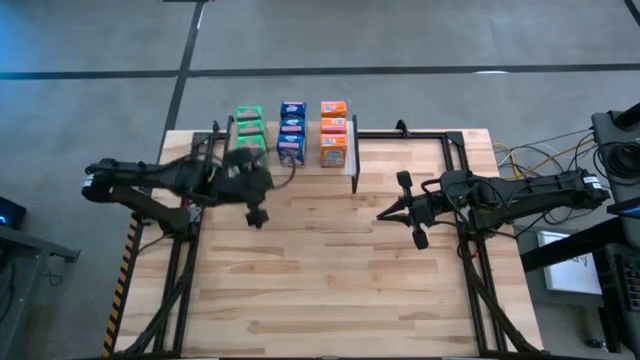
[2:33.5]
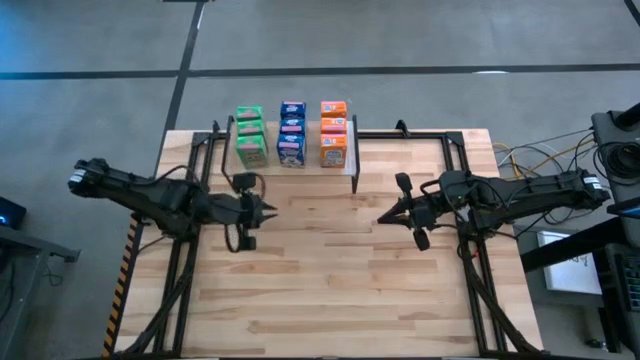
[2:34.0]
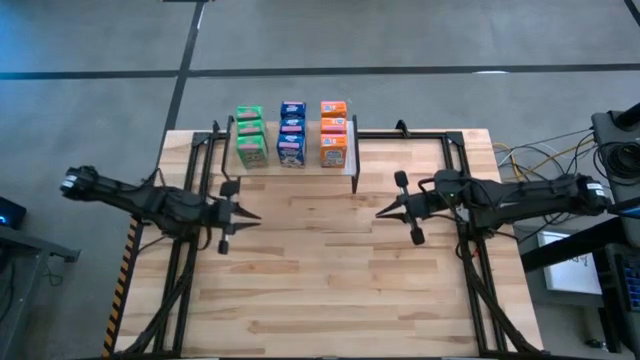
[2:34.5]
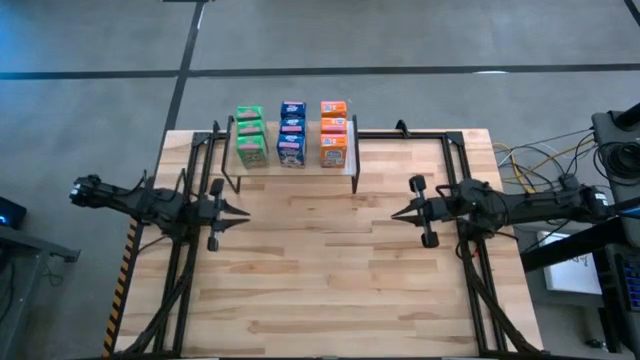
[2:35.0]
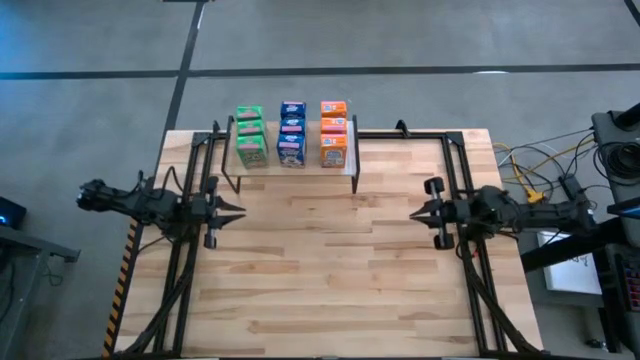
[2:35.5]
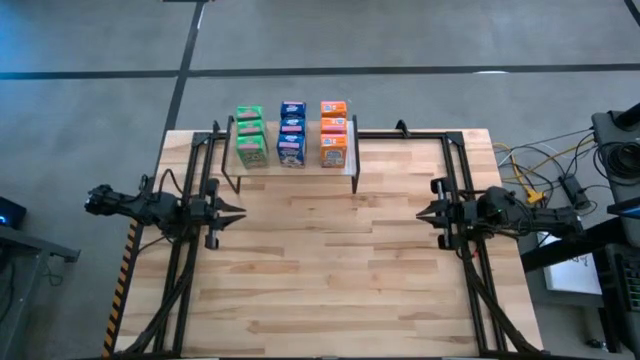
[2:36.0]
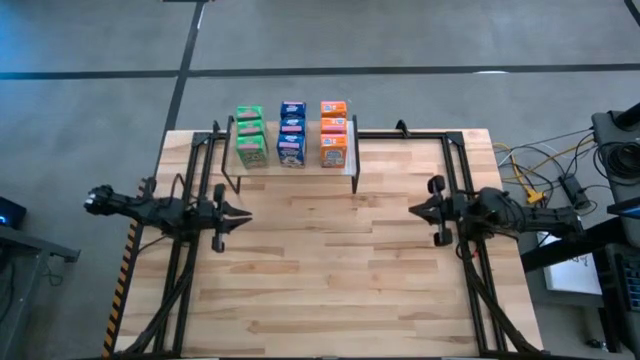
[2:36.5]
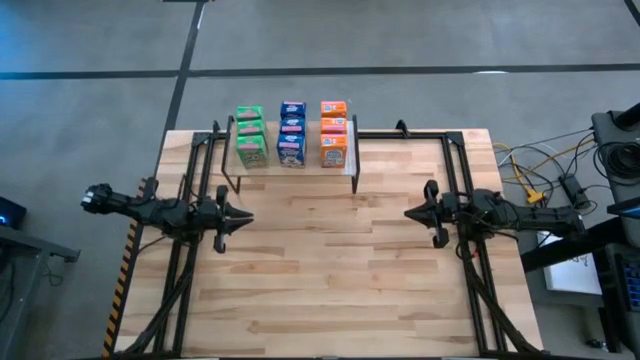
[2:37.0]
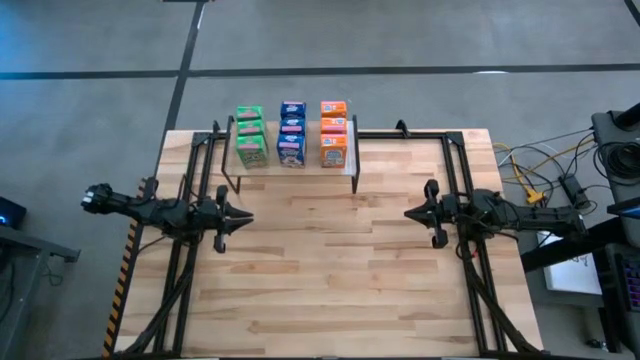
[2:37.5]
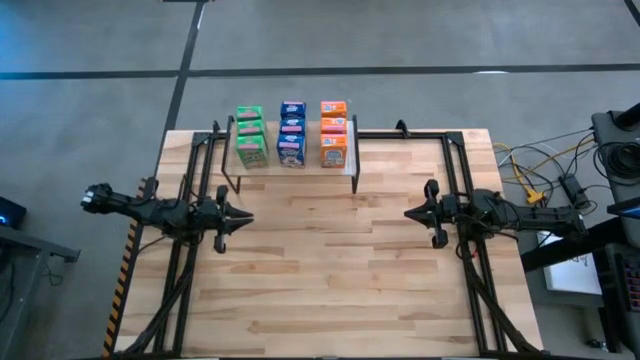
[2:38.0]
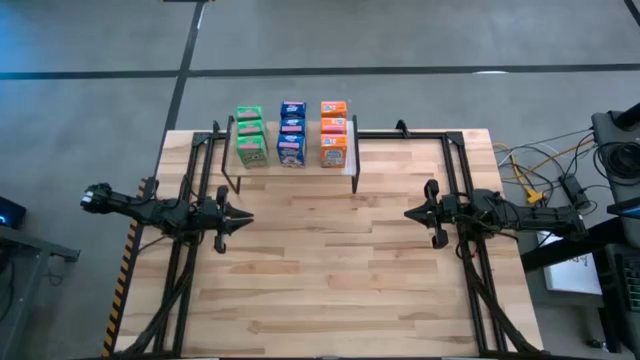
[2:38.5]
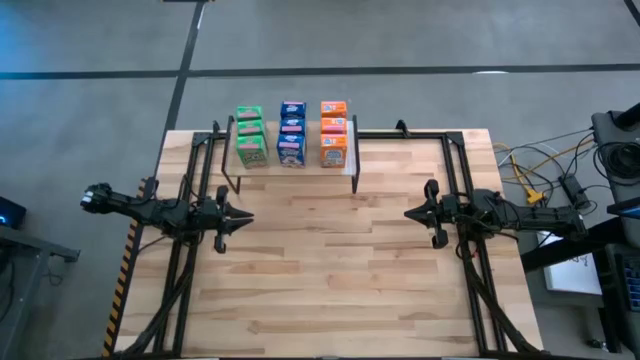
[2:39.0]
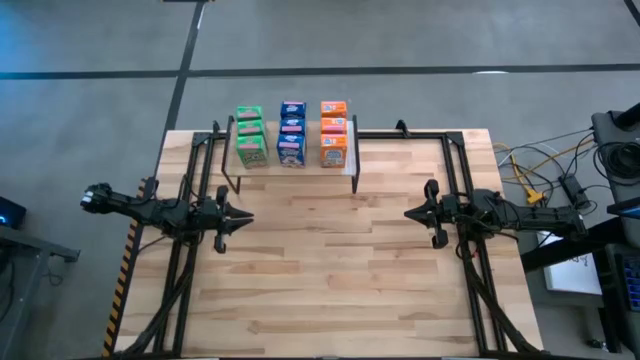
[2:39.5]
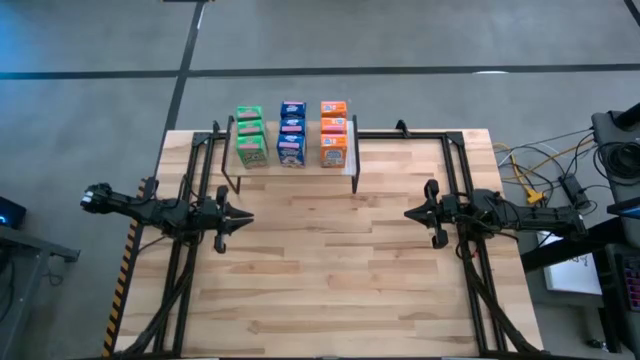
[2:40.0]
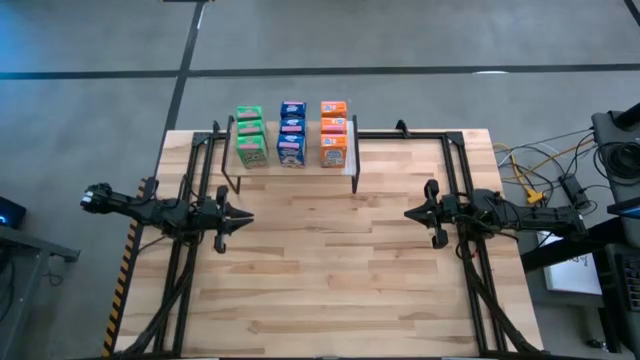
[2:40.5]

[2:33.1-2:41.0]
Task: Stack cereal on shelf
Return to Home Position

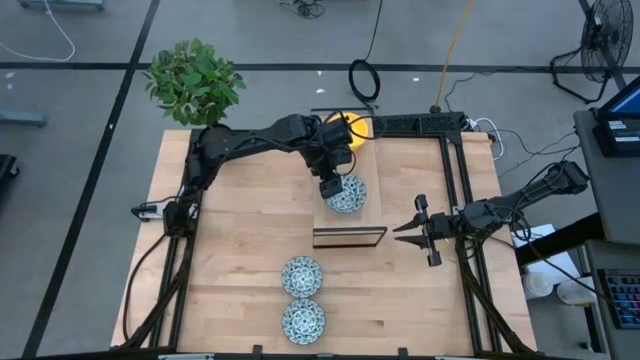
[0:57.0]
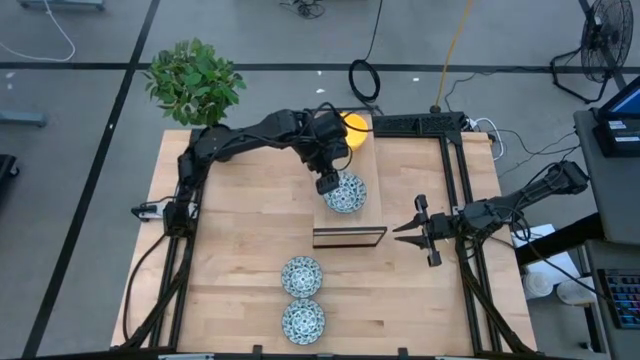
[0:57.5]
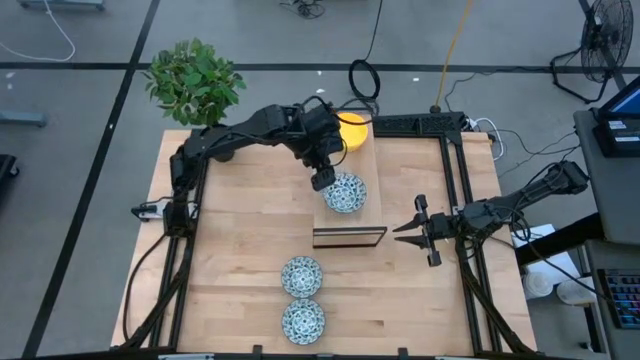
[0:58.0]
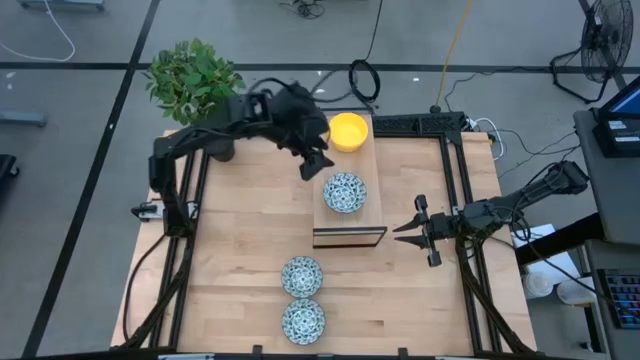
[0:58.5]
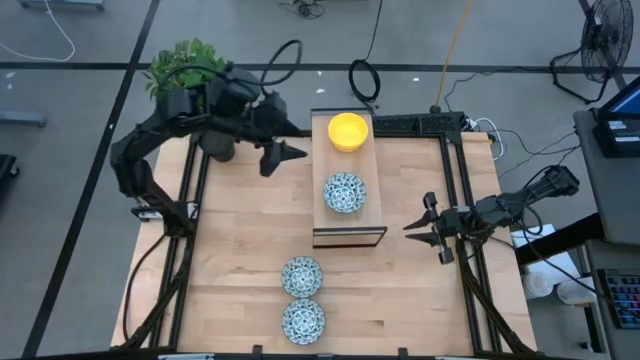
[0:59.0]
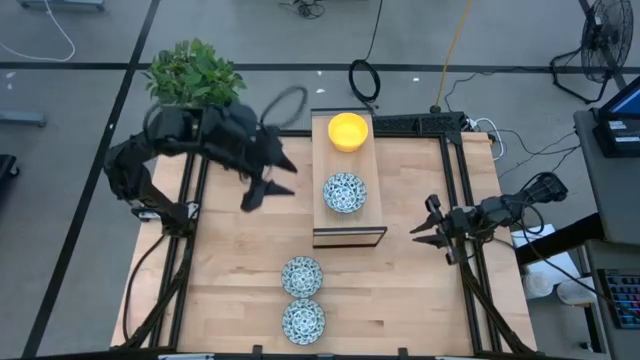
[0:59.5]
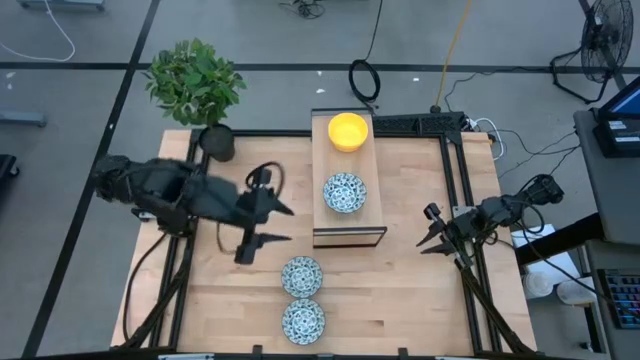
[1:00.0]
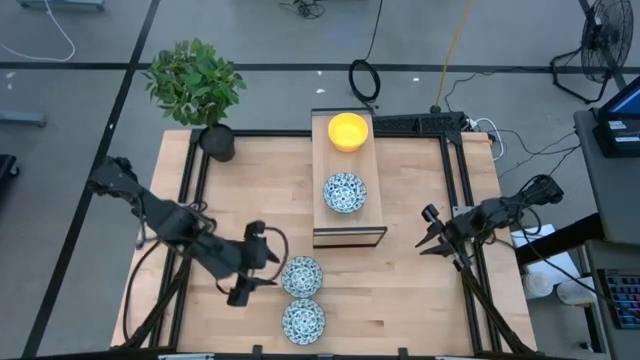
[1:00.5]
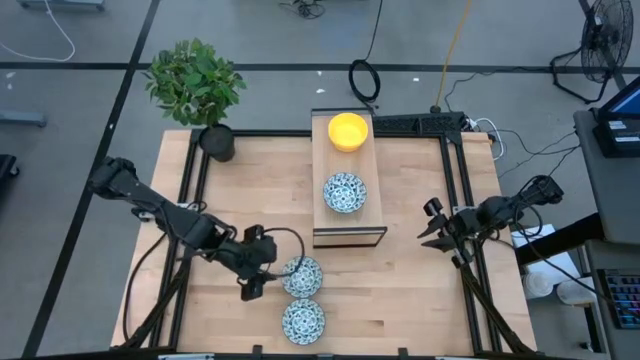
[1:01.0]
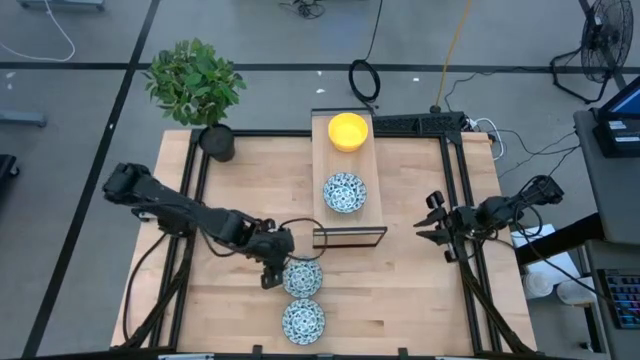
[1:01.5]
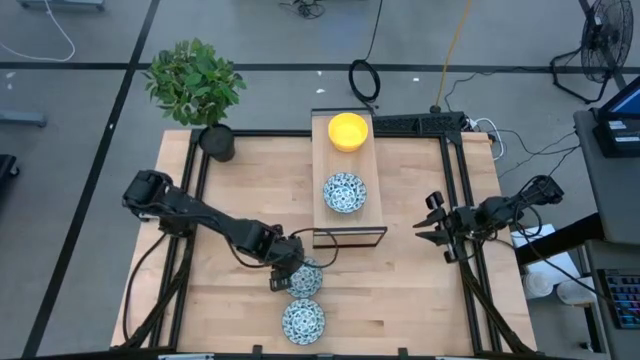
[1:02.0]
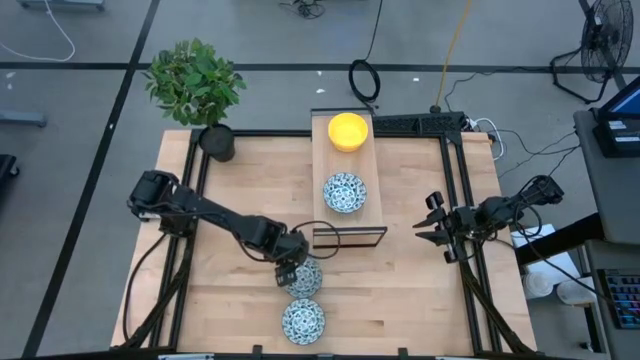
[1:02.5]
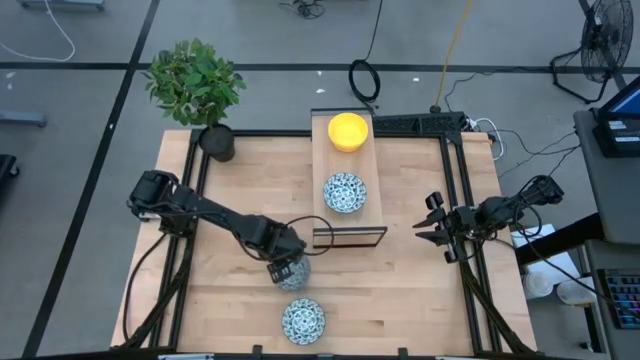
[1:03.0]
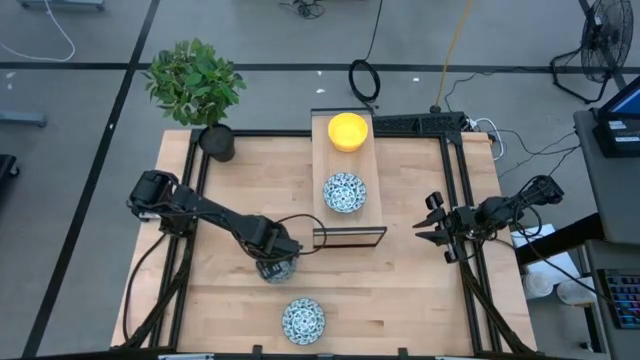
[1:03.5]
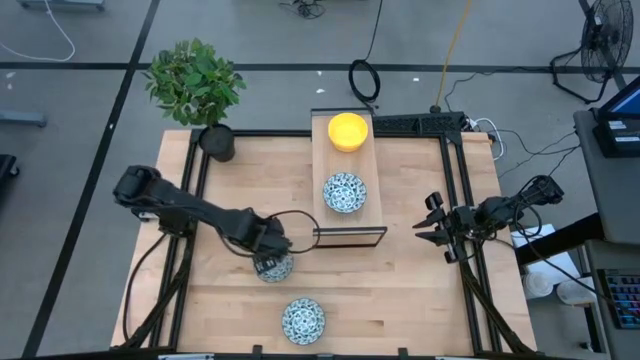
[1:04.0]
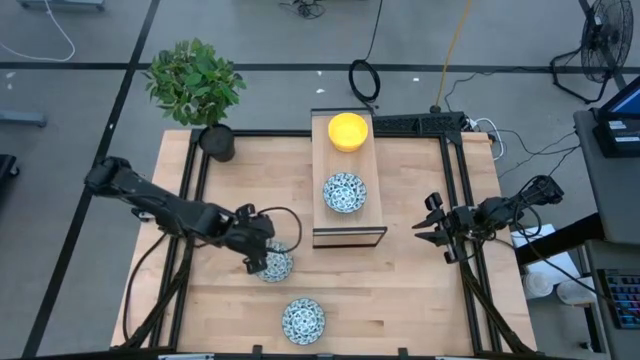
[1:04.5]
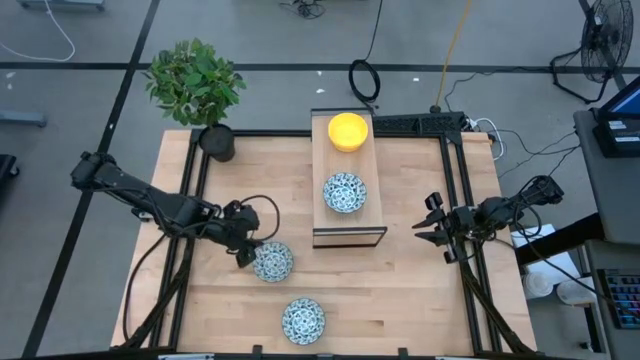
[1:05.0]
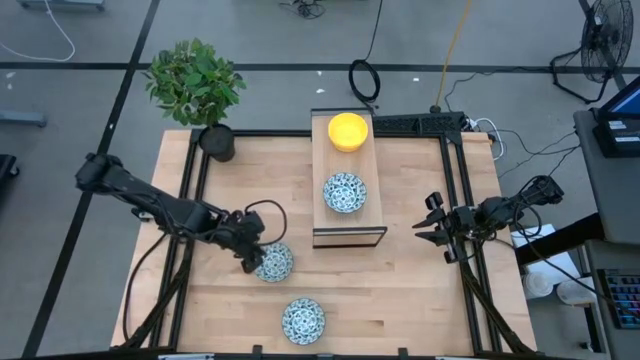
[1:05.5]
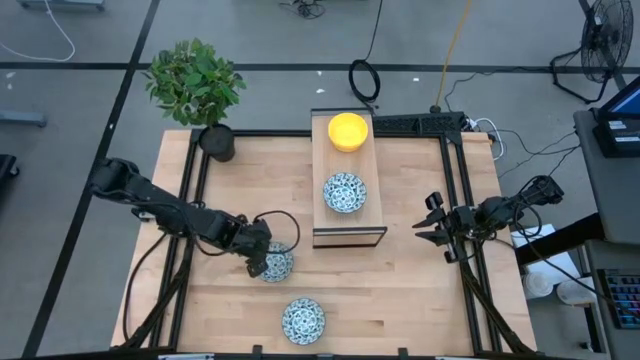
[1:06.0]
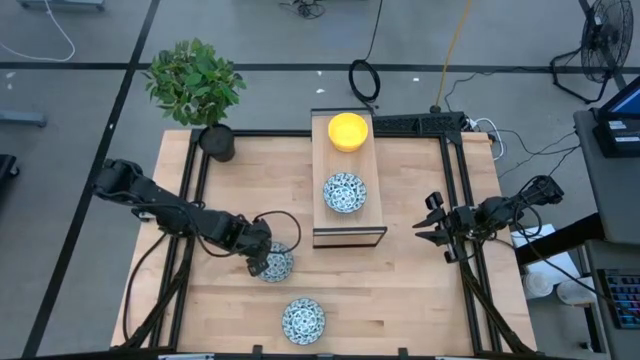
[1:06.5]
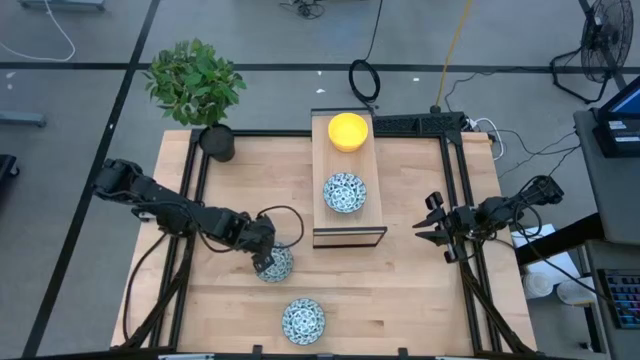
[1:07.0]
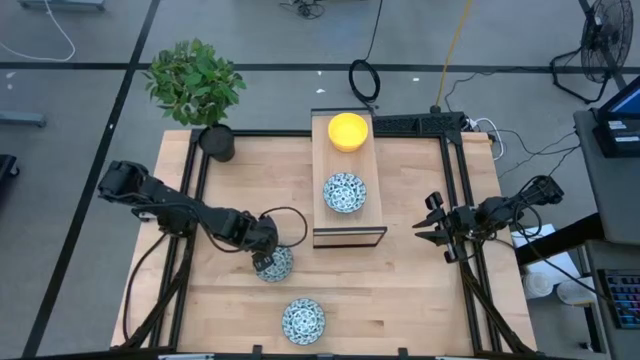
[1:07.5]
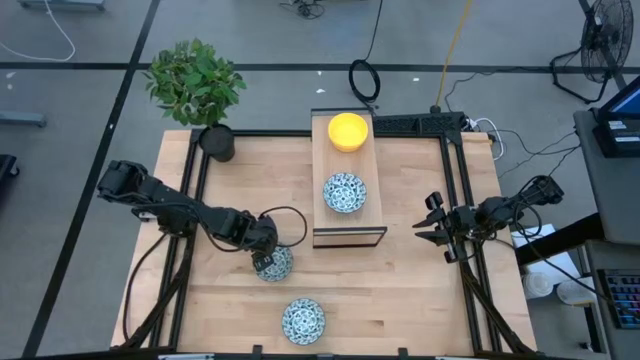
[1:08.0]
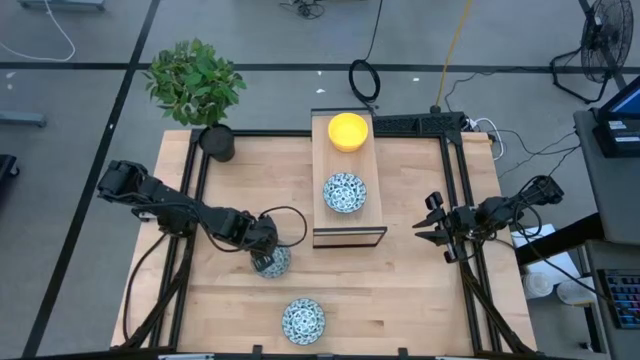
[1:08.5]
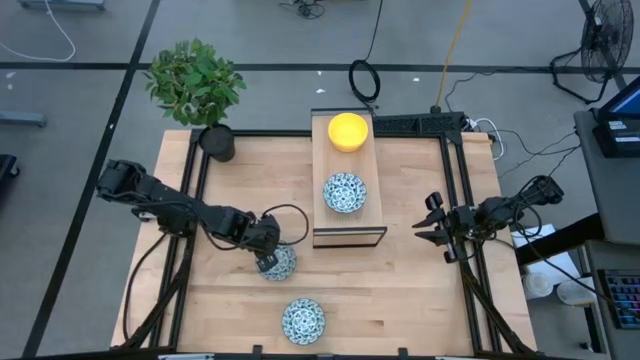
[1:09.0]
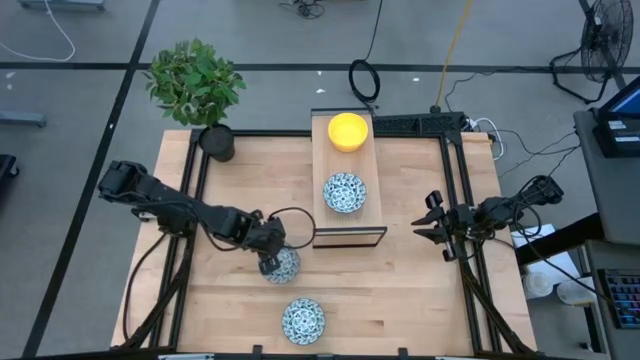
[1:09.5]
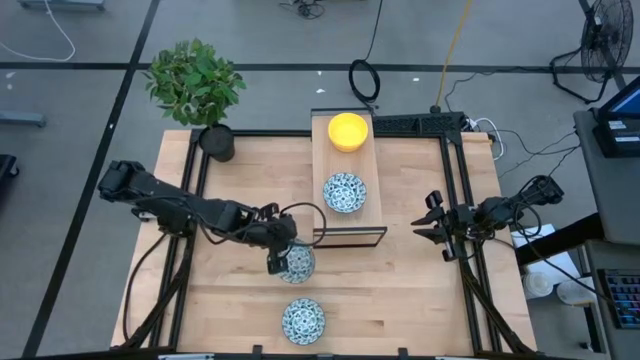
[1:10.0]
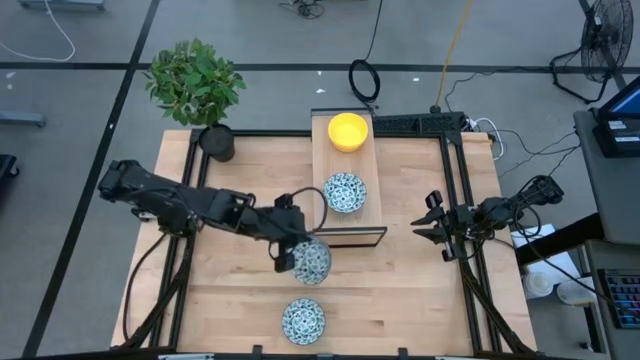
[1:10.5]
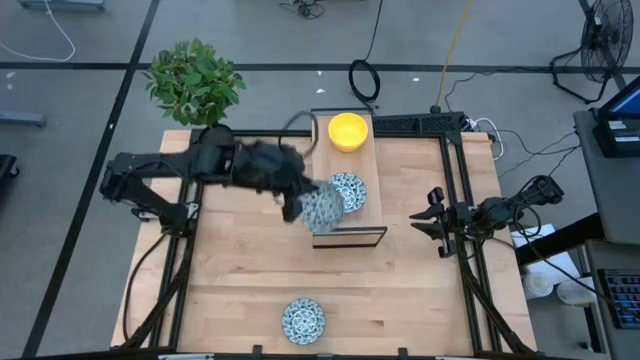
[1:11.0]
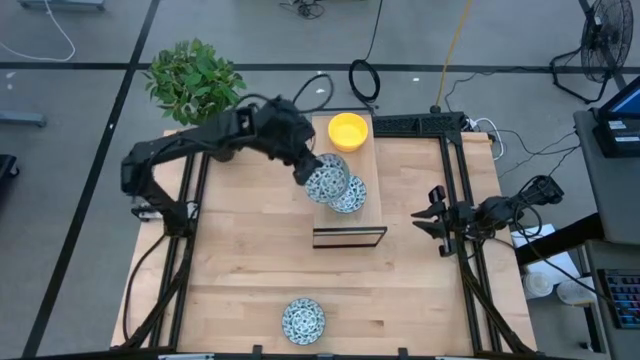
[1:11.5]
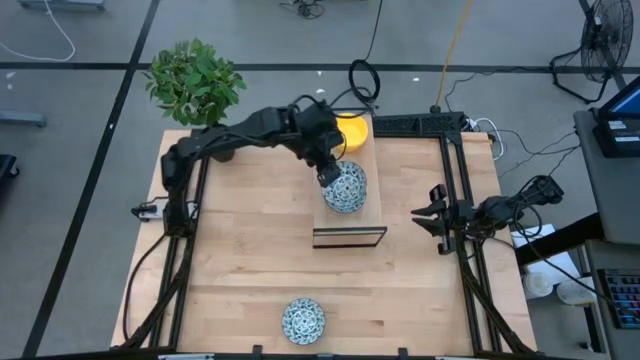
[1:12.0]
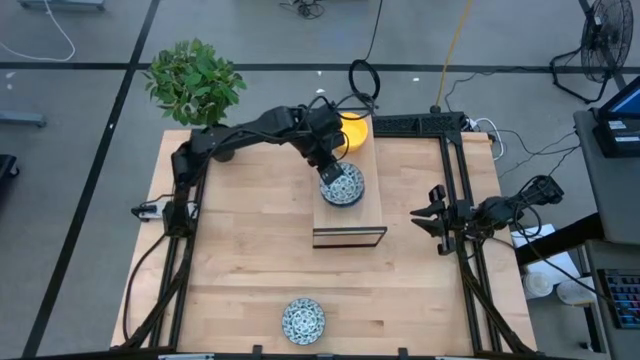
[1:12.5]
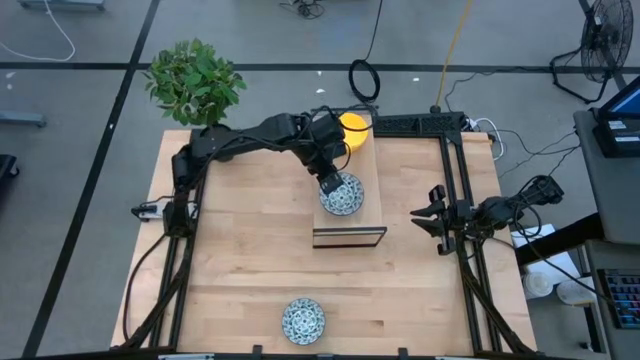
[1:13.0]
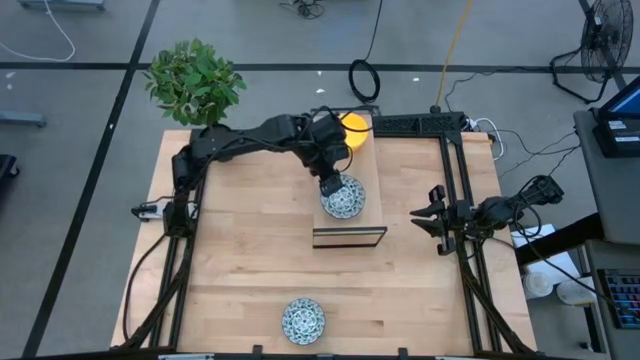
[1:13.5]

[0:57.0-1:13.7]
Task: Pick & Place Mini bowls
Stack the top blue patterned bowl on top of the blue patterned bowl on the shelf
